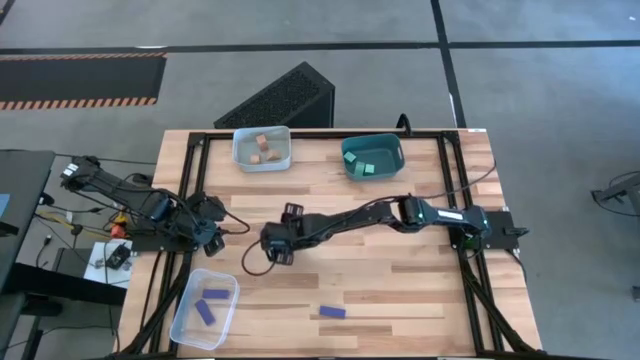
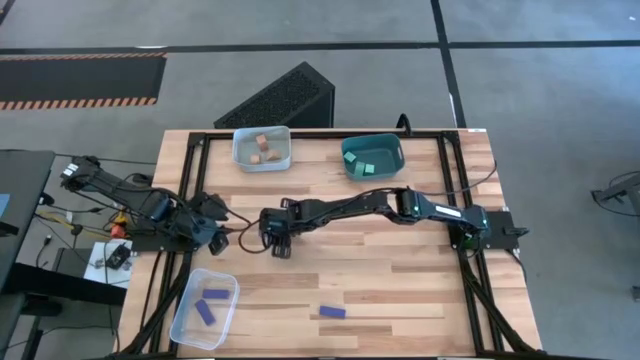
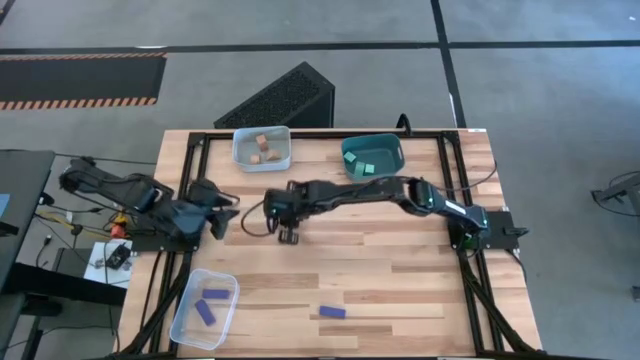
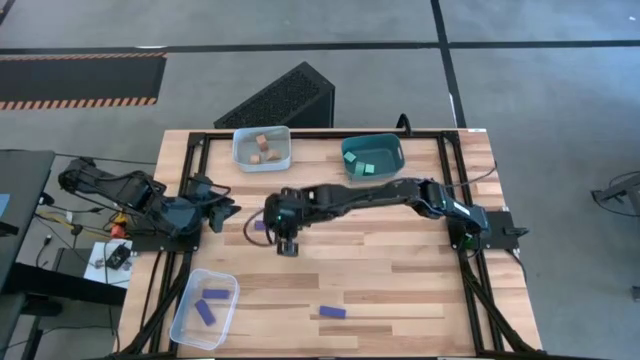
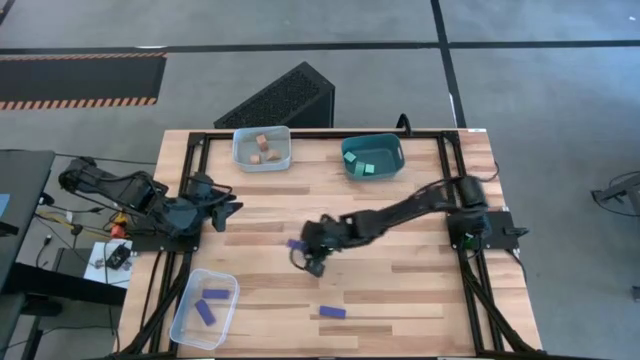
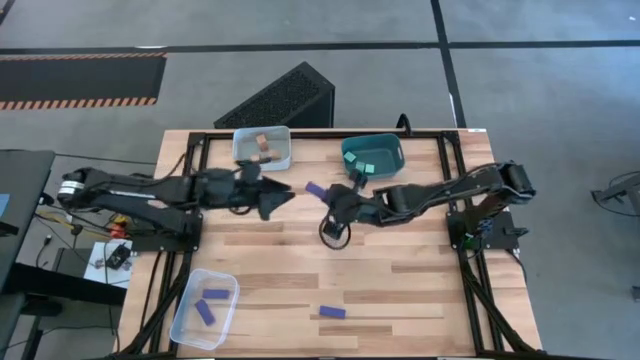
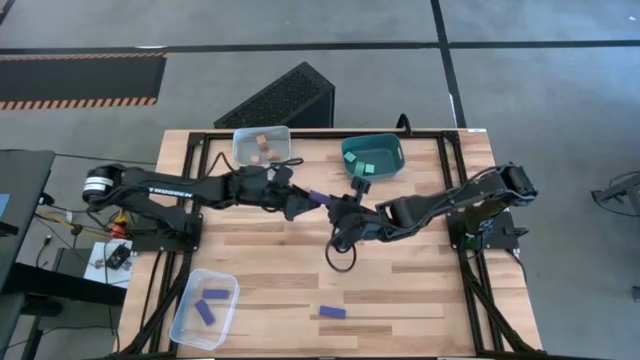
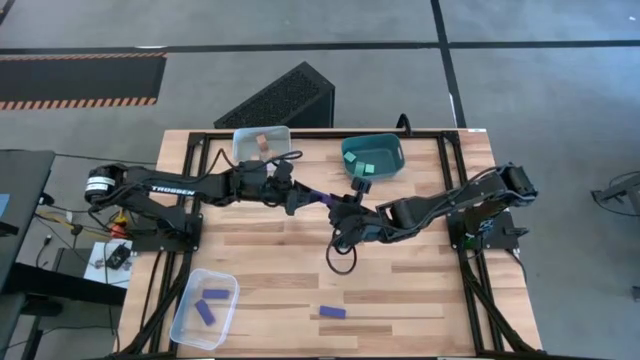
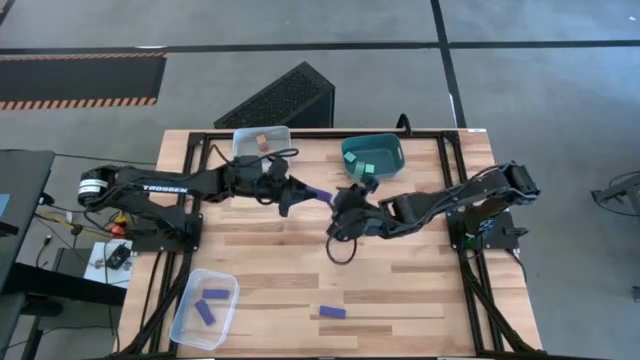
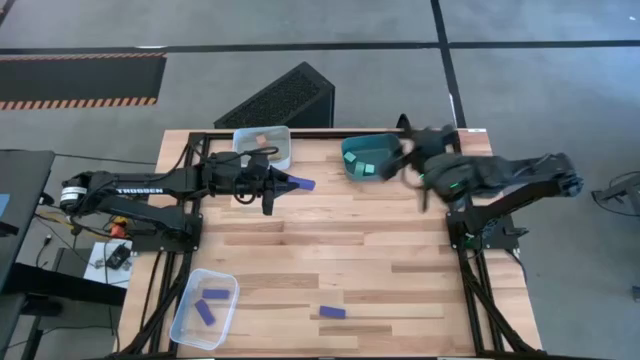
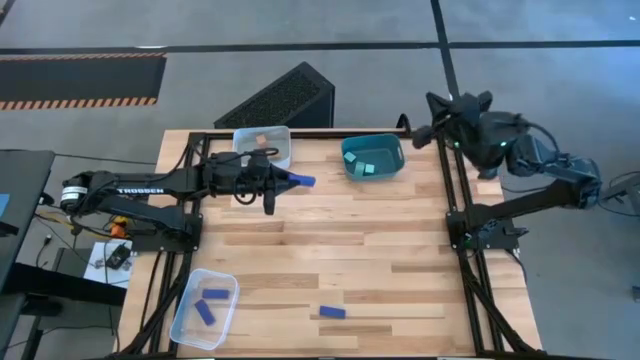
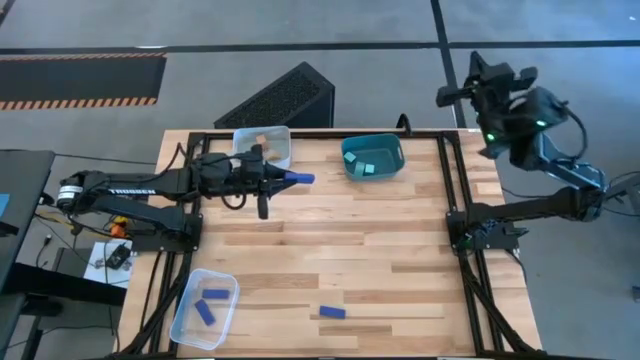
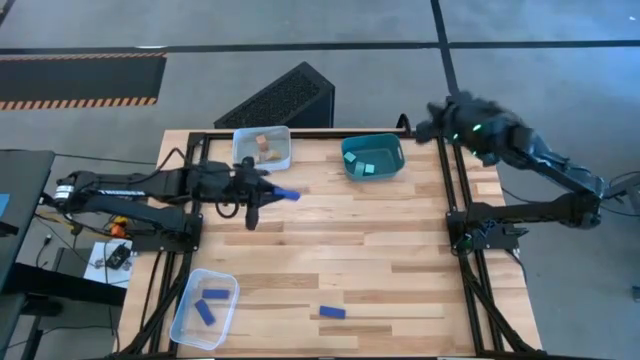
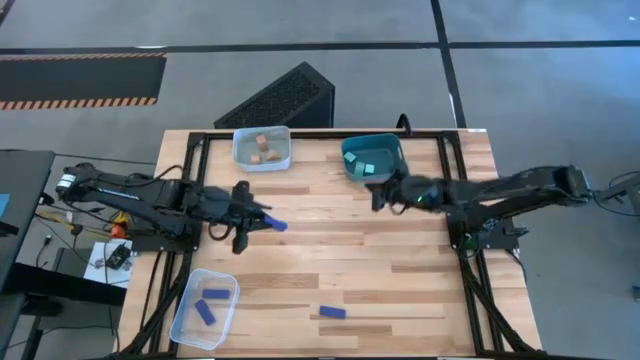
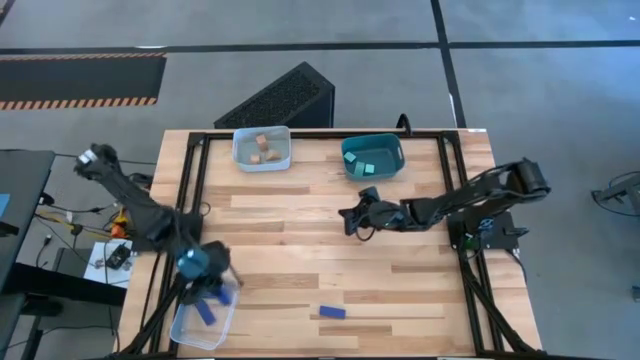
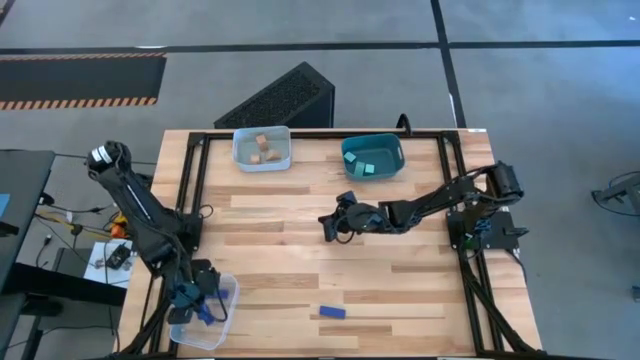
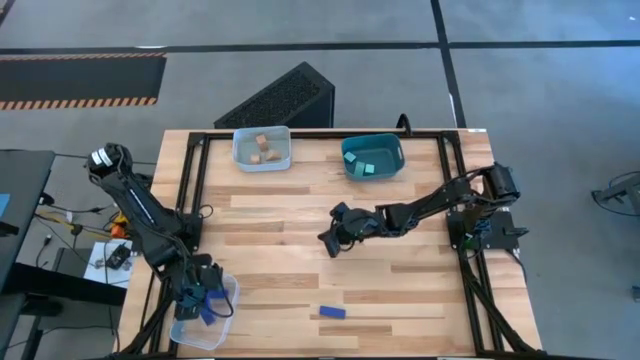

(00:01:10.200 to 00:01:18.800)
Task: Sort & place blocks by color
Put the top violet block into the transparent bin

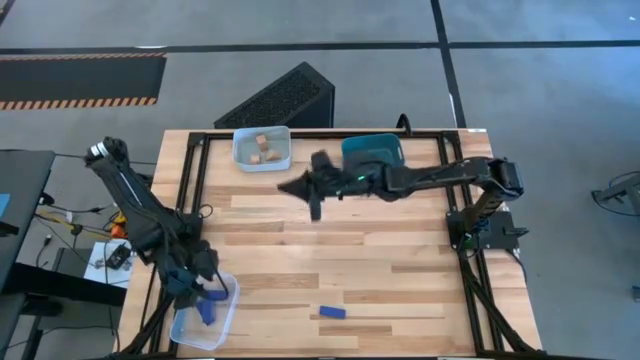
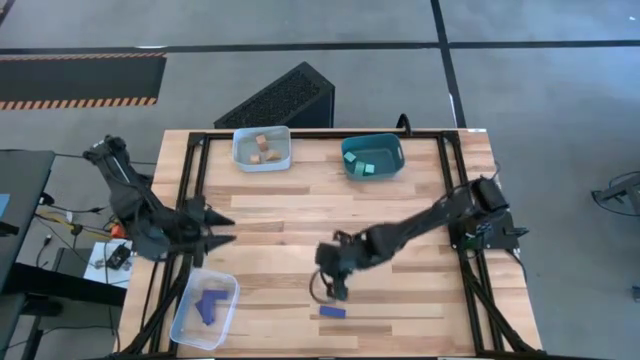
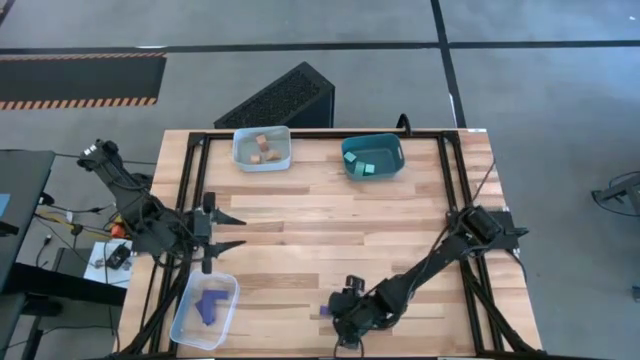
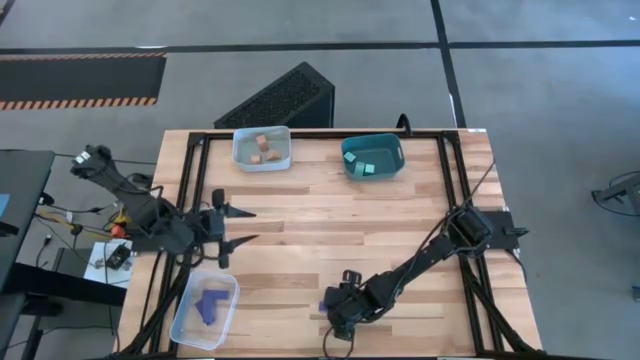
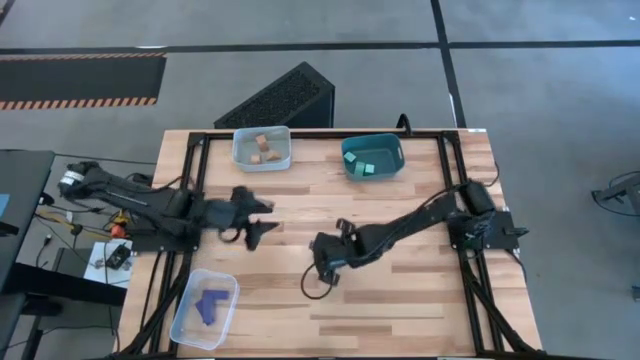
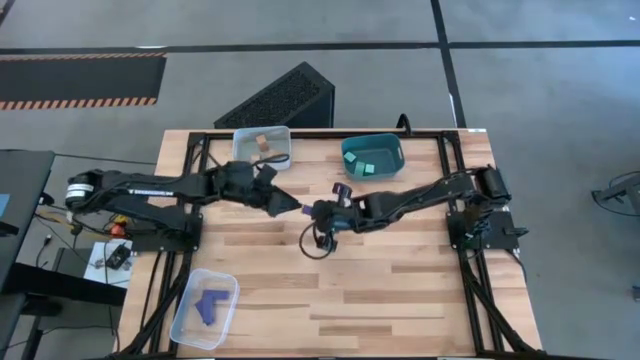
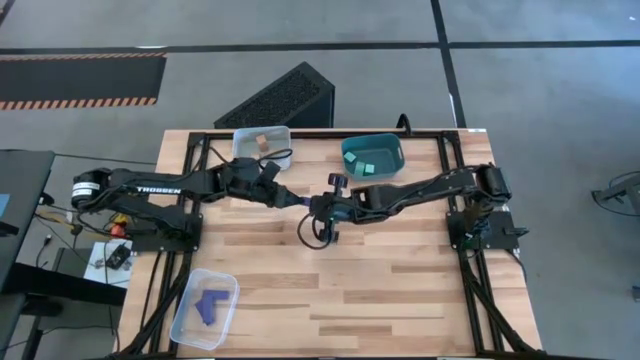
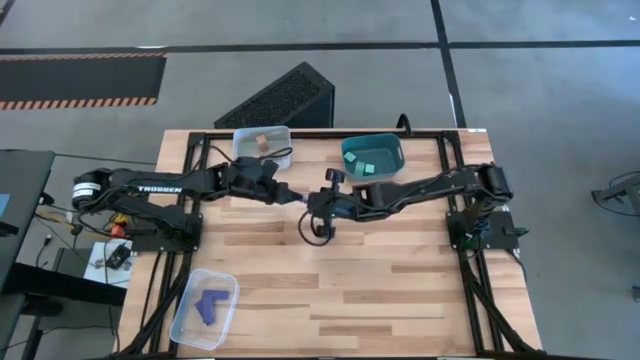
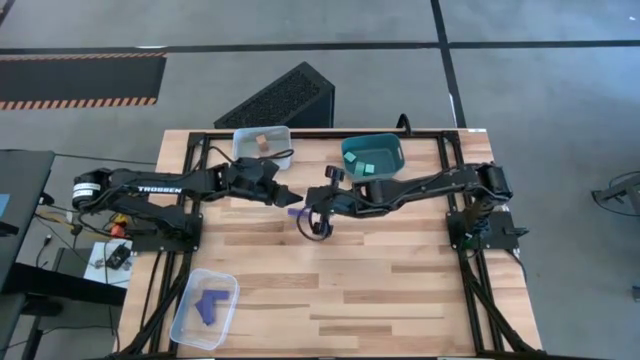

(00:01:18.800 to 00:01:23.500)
Put the violet block into the transparent bin

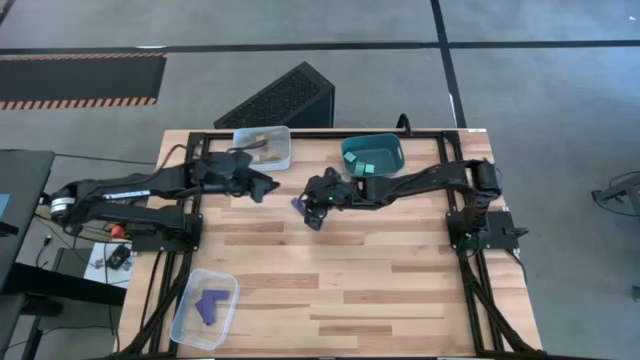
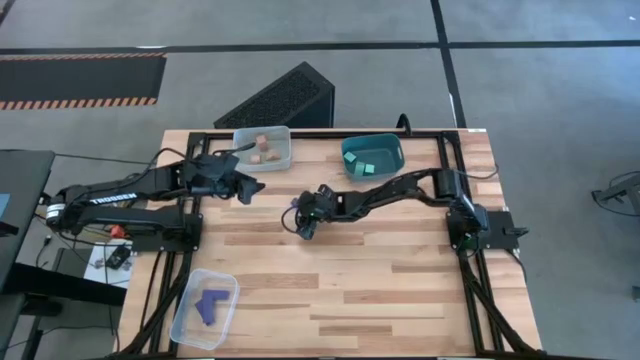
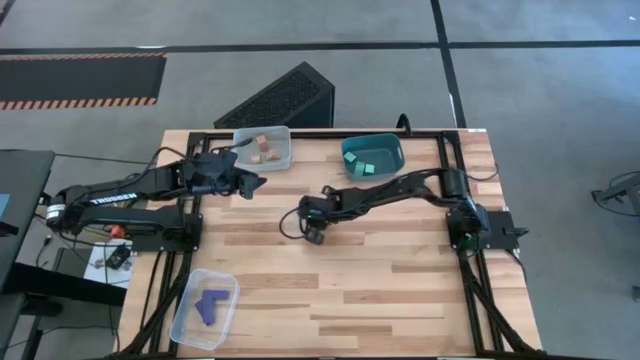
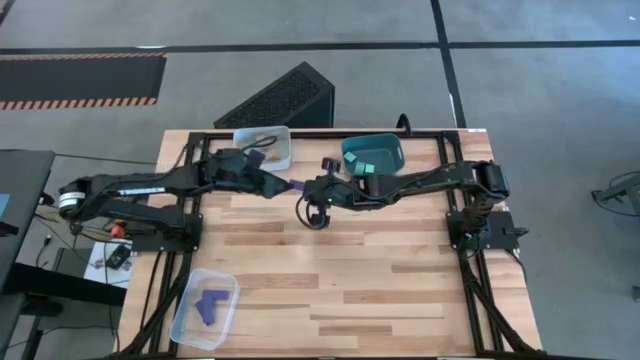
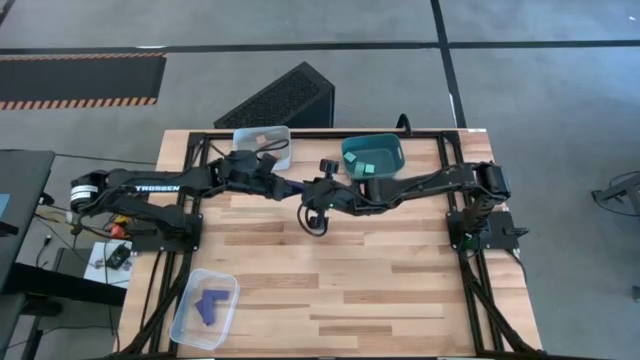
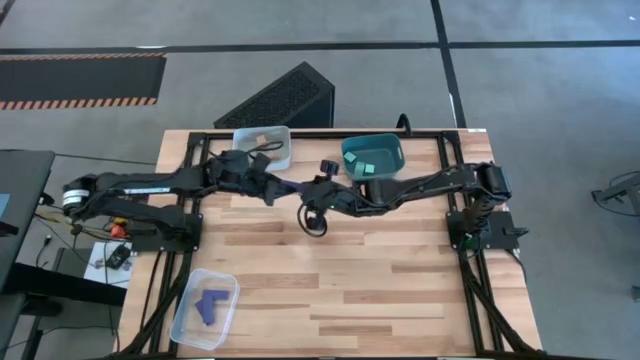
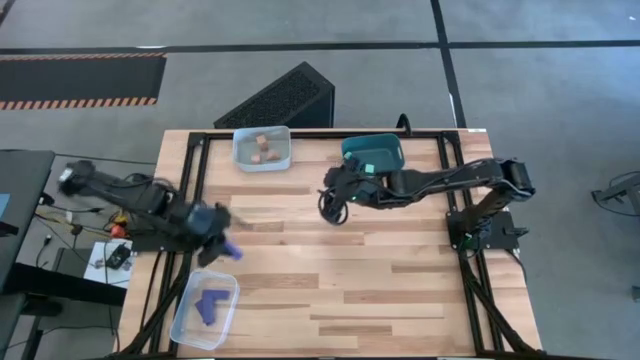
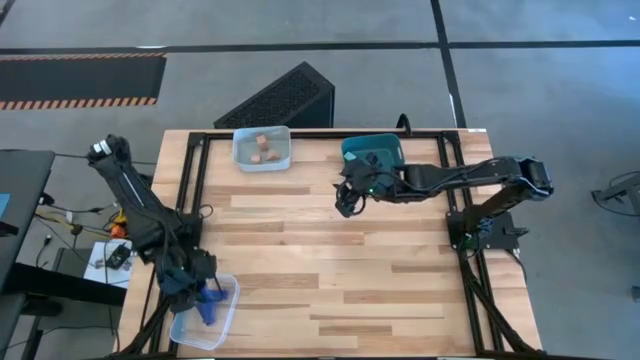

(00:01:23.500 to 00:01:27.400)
Put the violet block into the transparent bin

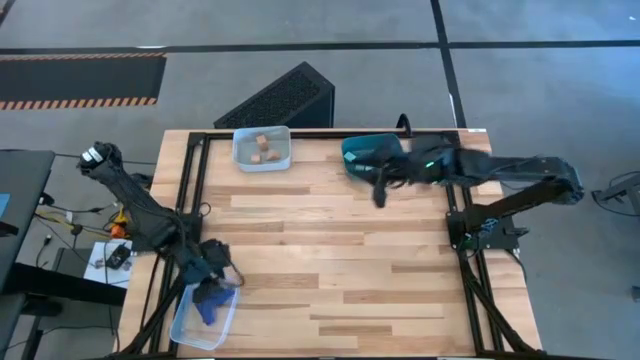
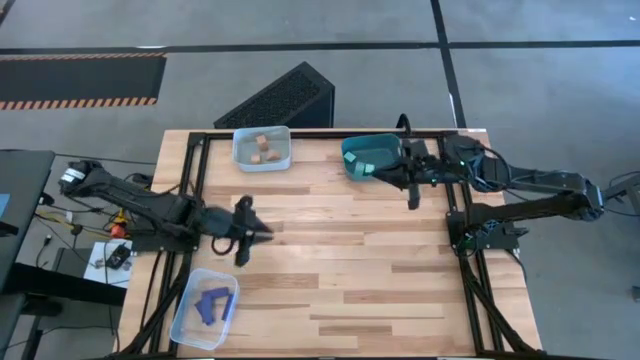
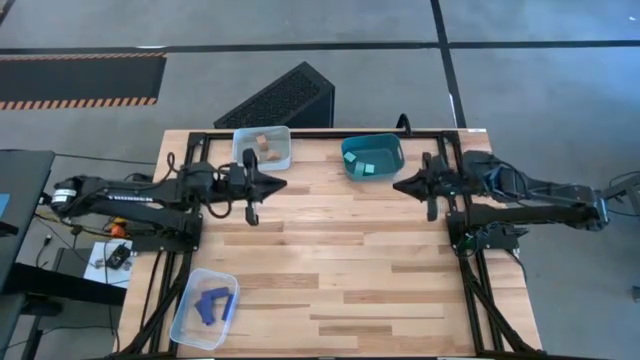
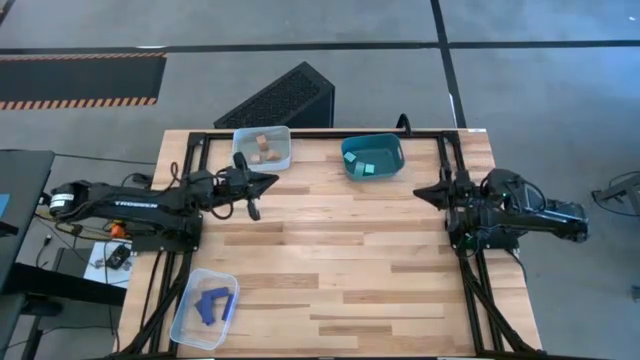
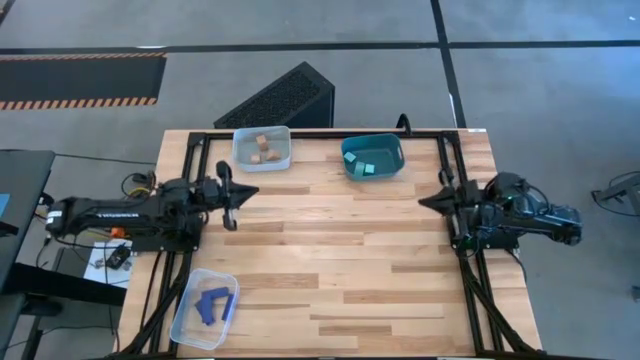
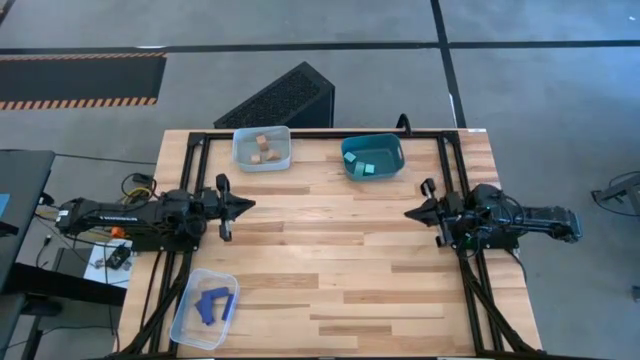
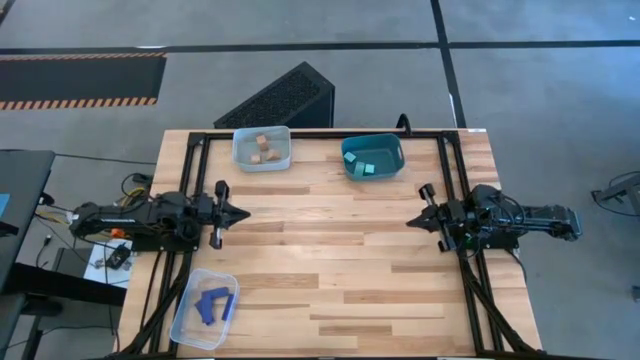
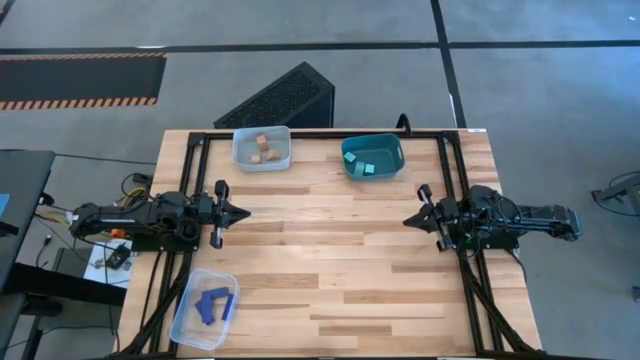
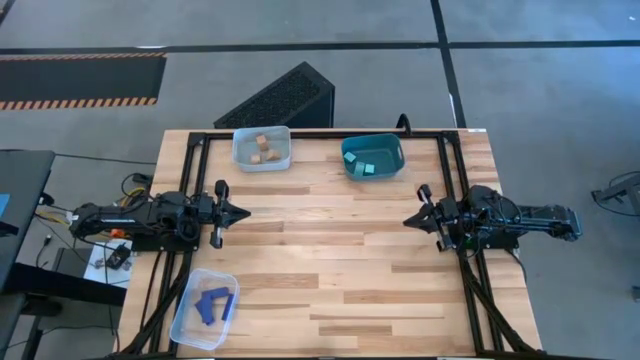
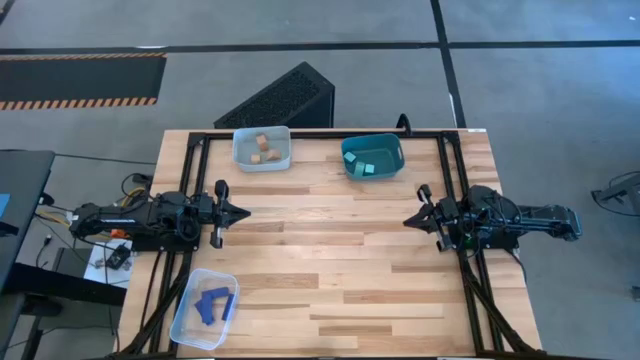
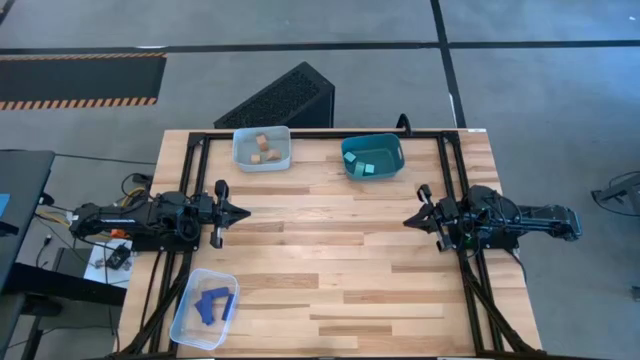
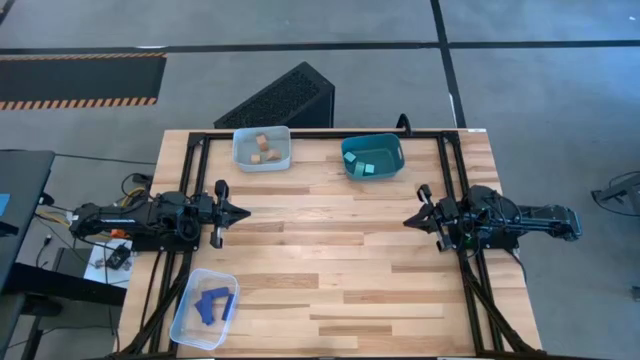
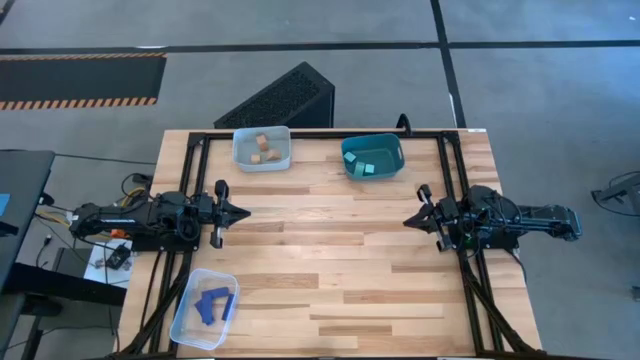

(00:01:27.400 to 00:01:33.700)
Return to Home Position
